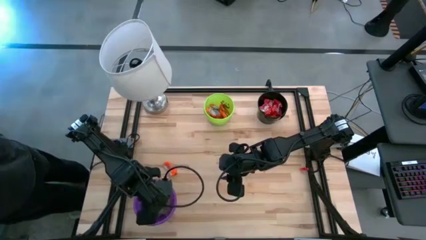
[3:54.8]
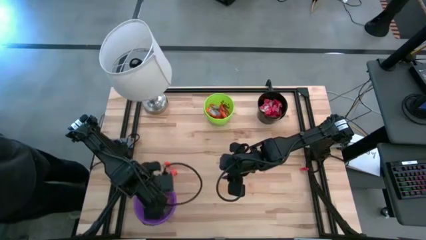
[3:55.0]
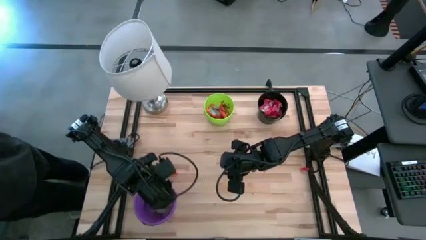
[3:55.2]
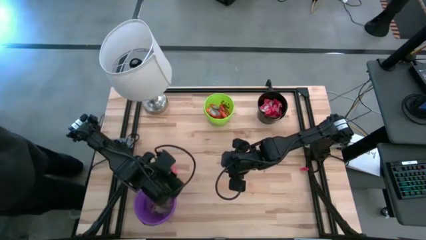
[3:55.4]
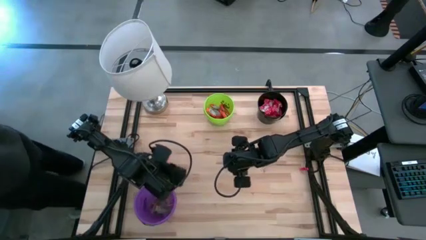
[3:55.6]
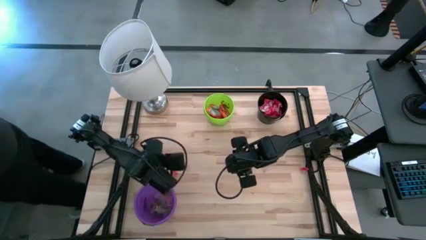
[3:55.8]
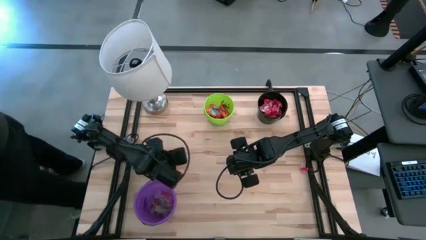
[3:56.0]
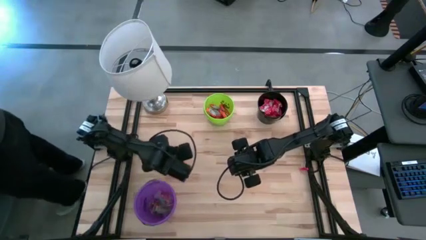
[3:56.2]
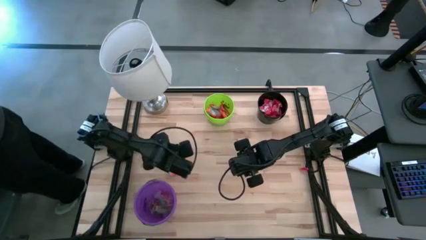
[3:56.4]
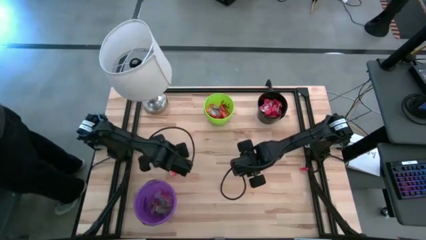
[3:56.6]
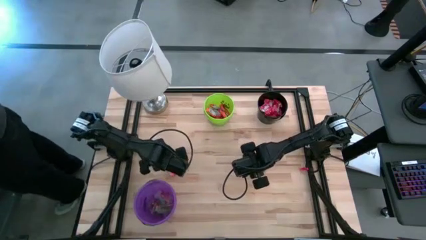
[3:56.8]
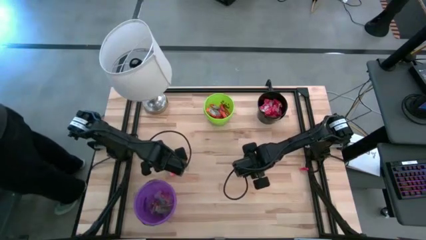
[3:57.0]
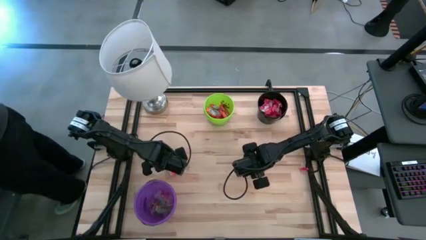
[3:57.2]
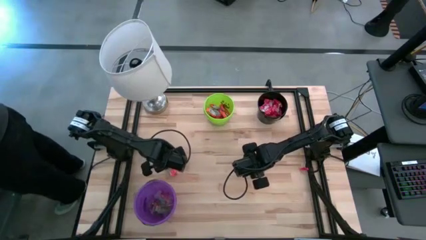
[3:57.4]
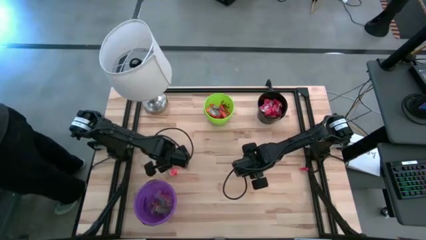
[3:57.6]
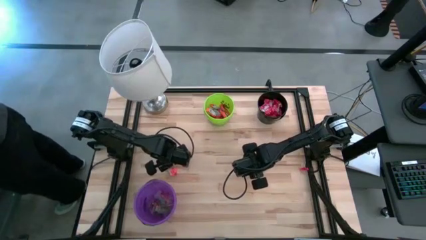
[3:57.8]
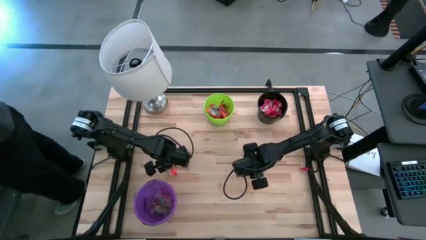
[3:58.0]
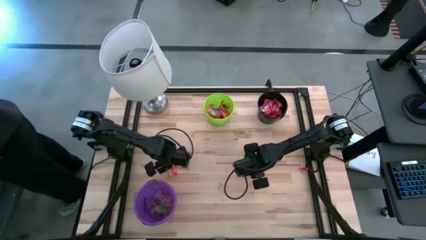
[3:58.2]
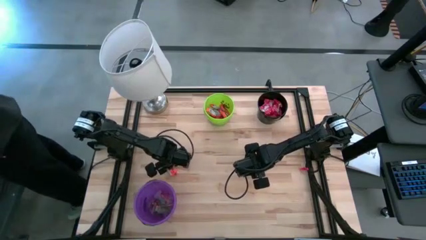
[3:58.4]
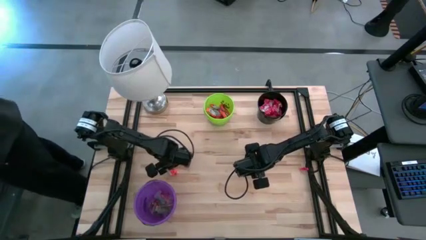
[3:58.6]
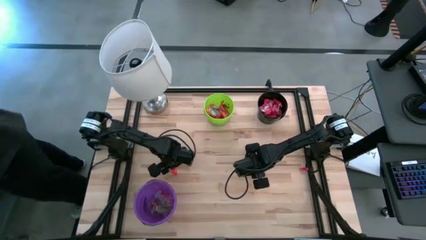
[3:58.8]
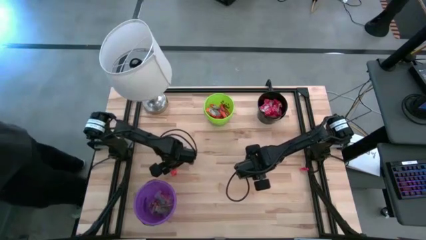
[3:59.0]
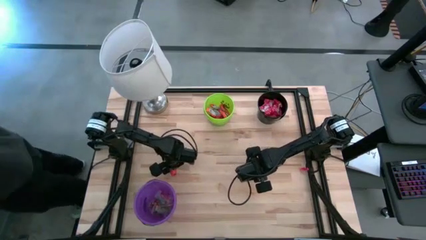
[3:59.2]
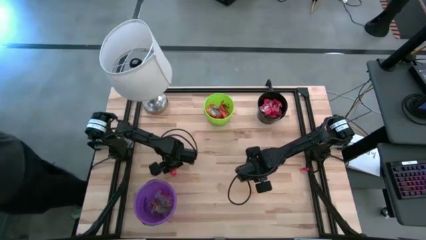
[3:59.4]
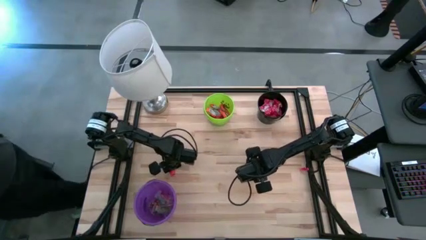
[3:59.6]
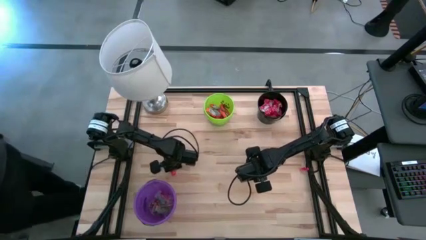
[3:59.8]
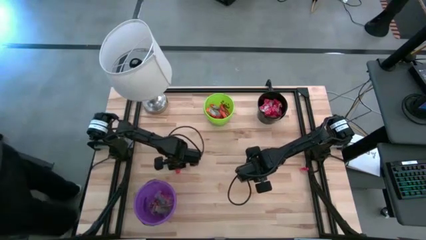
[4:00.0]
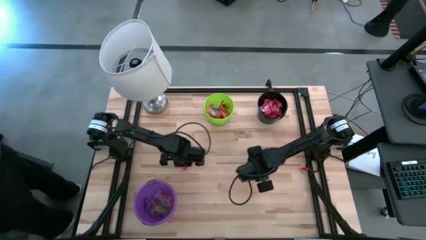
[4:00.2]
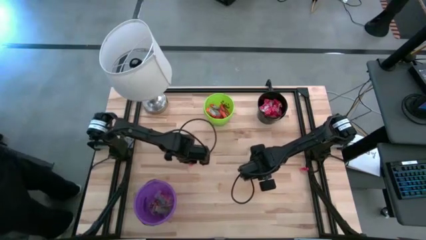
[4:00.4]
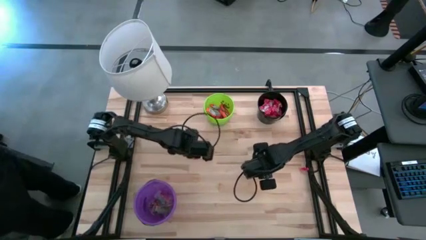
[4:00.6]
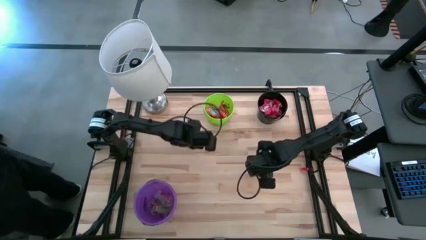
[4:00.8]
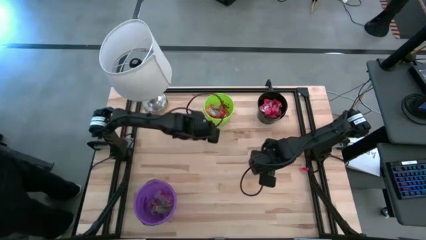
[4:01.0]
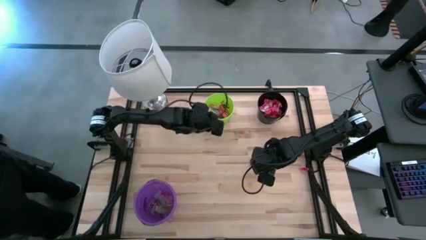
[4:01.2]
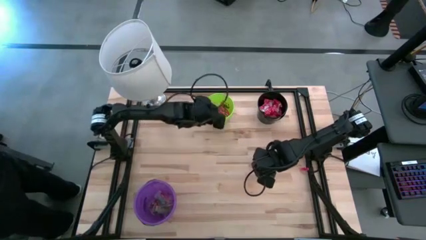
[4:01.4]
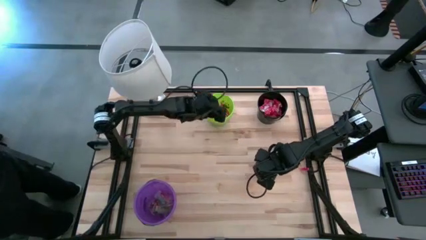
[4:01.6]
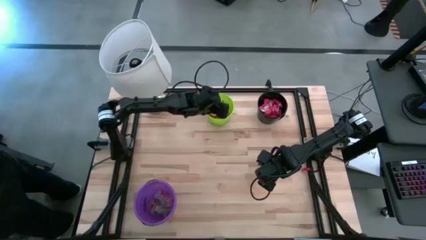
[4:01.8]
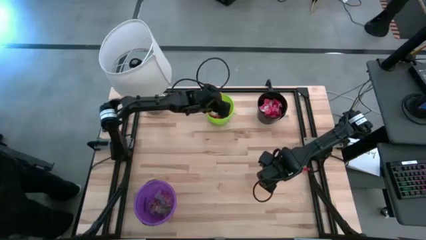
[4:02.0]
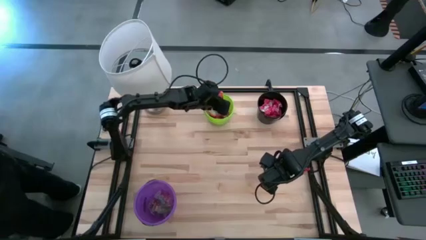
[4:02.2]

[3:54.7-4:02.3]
Task: Sort candy
Put the orange chocolate into the green bucket

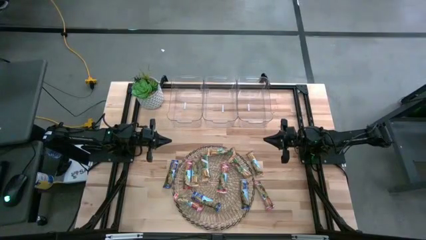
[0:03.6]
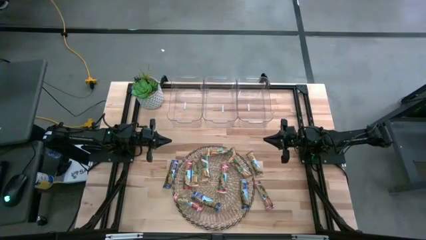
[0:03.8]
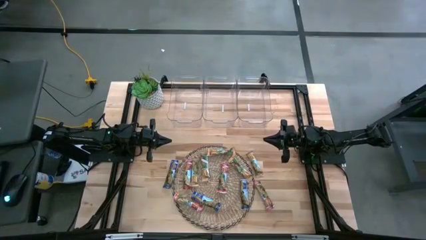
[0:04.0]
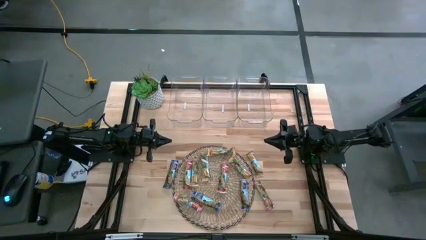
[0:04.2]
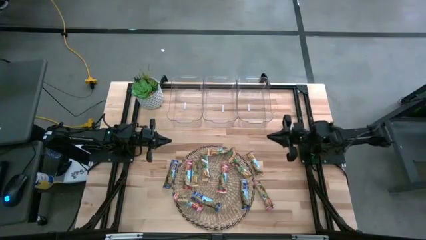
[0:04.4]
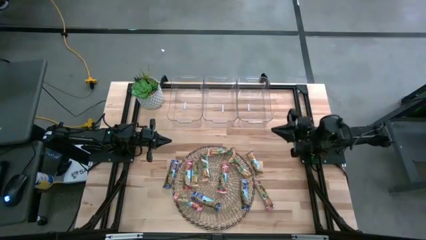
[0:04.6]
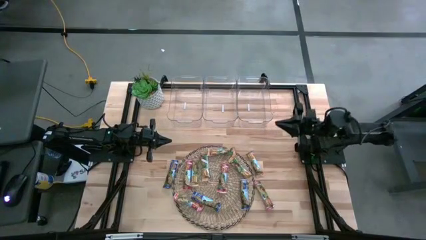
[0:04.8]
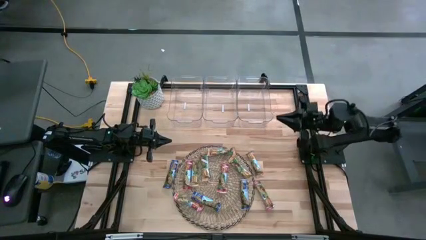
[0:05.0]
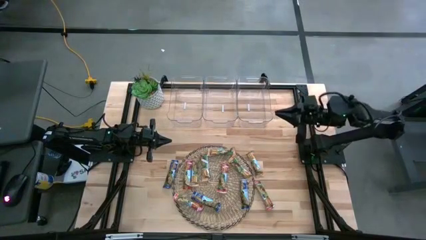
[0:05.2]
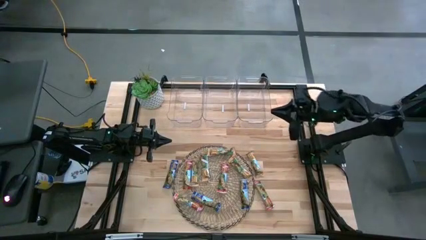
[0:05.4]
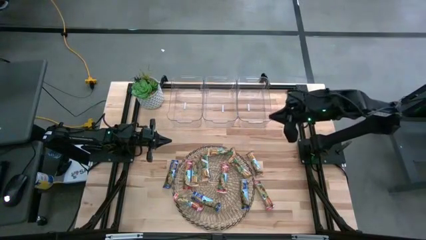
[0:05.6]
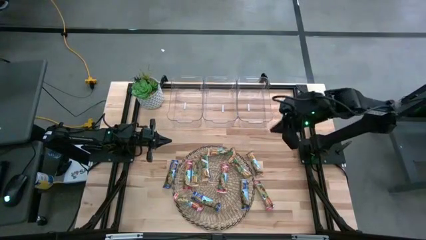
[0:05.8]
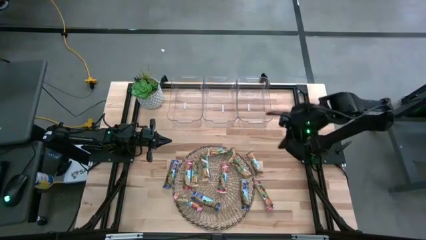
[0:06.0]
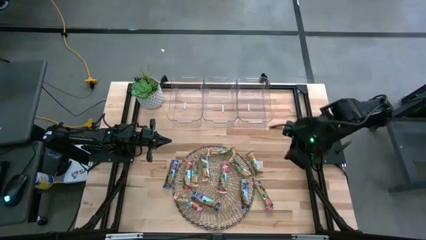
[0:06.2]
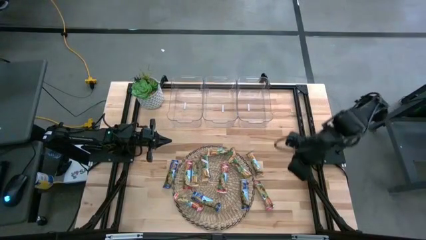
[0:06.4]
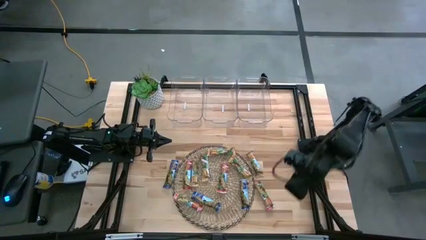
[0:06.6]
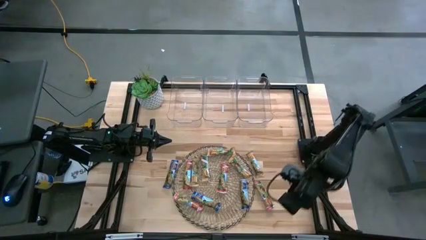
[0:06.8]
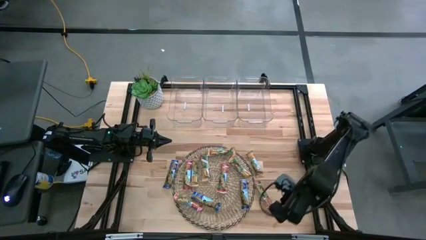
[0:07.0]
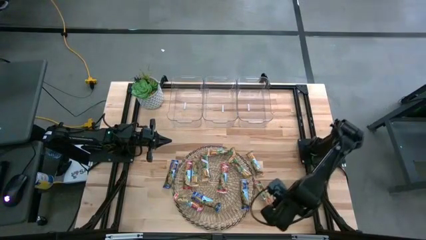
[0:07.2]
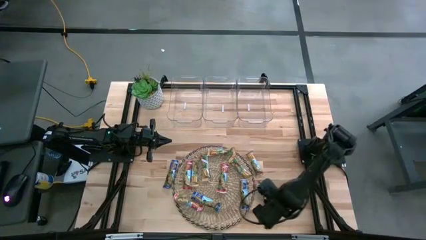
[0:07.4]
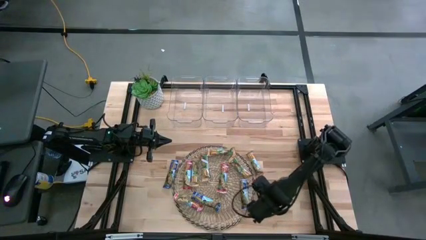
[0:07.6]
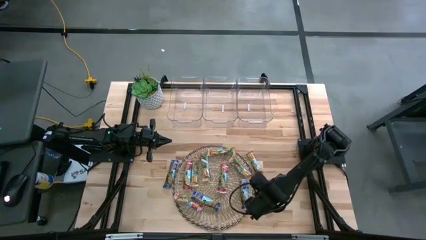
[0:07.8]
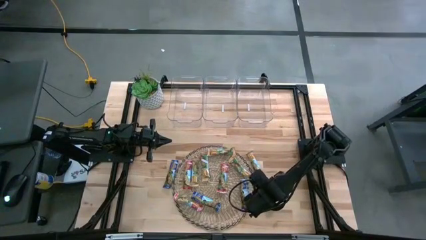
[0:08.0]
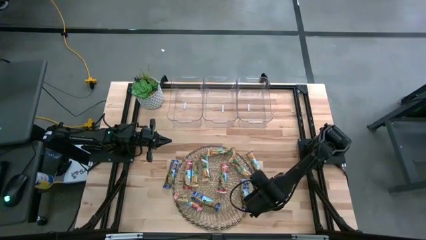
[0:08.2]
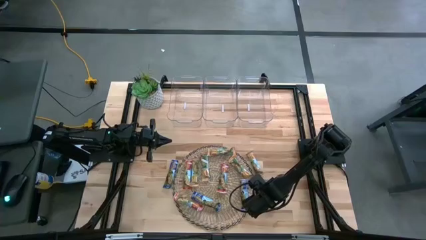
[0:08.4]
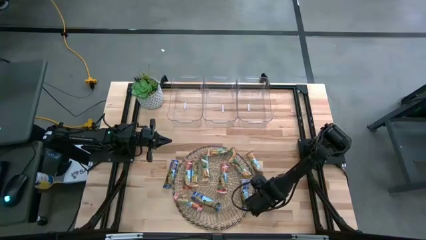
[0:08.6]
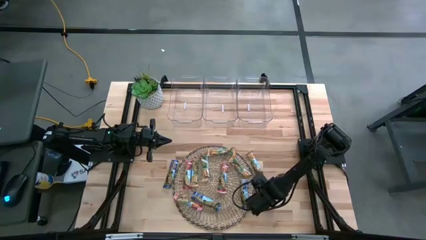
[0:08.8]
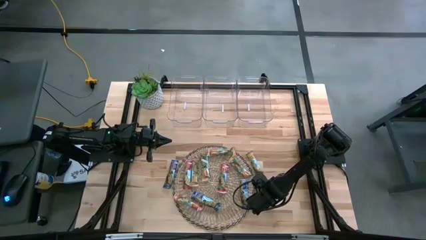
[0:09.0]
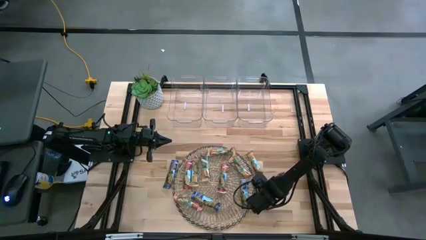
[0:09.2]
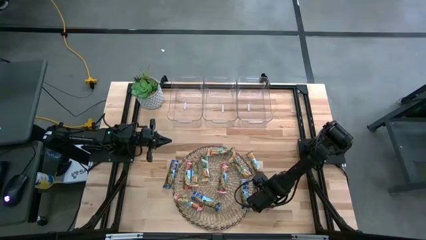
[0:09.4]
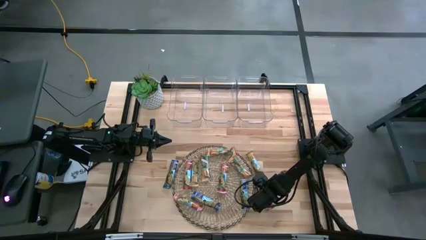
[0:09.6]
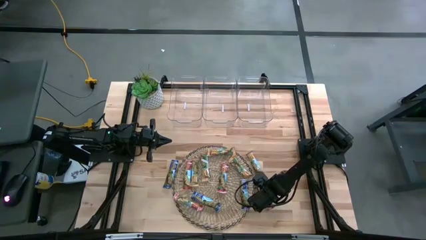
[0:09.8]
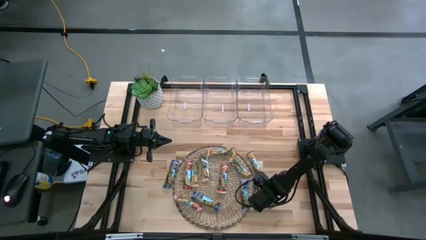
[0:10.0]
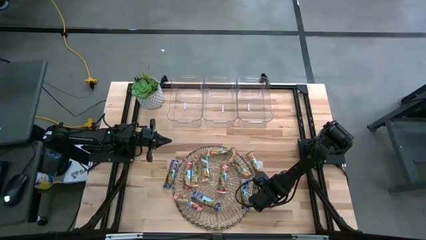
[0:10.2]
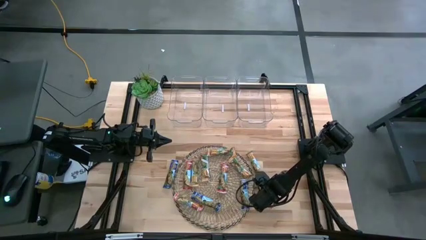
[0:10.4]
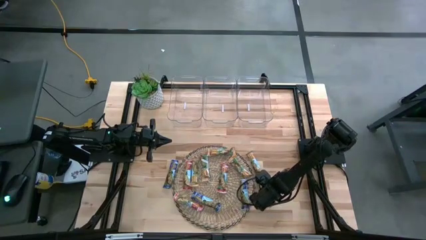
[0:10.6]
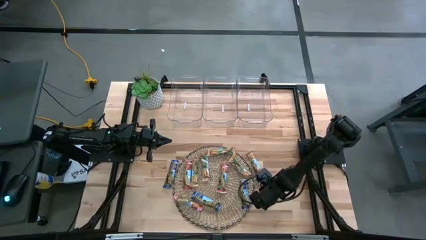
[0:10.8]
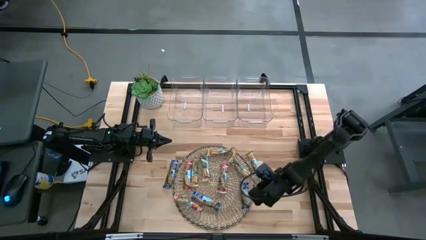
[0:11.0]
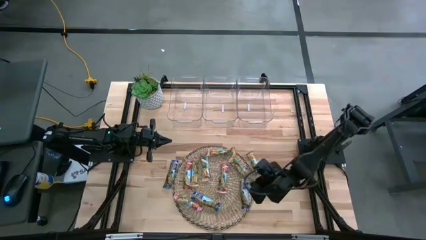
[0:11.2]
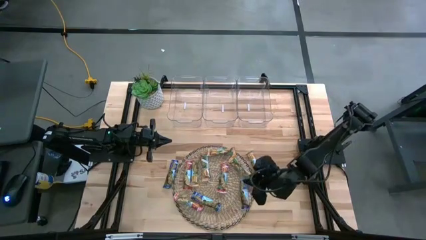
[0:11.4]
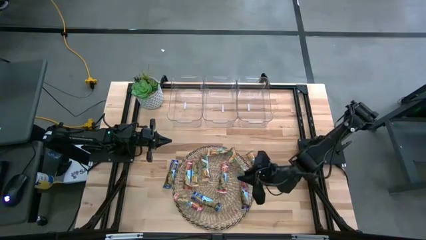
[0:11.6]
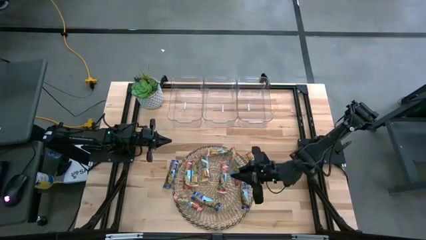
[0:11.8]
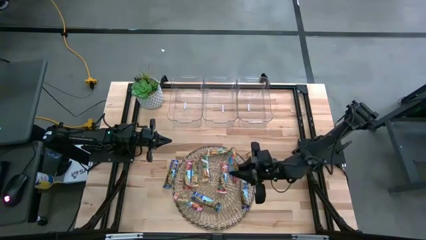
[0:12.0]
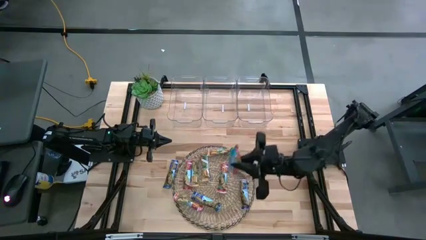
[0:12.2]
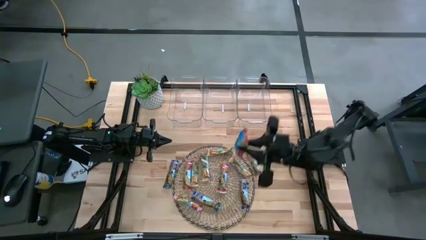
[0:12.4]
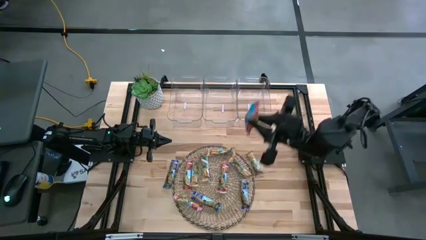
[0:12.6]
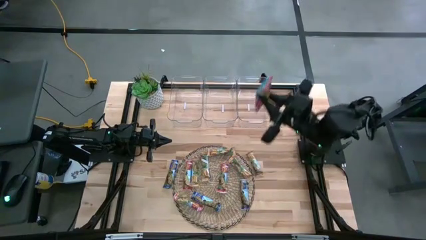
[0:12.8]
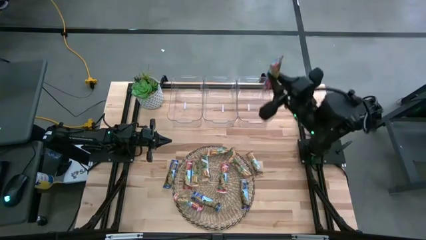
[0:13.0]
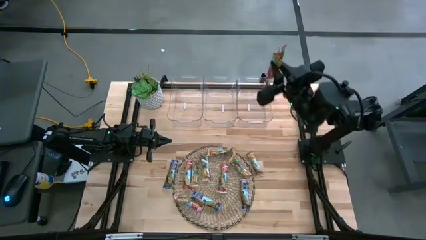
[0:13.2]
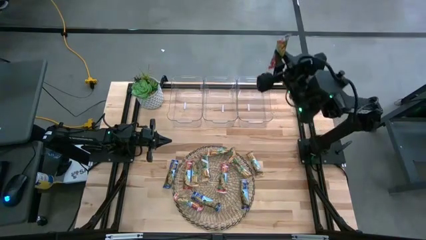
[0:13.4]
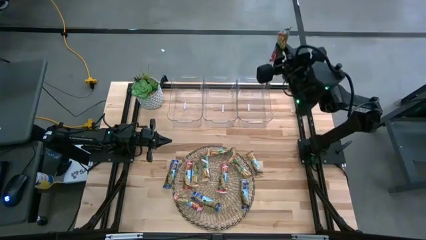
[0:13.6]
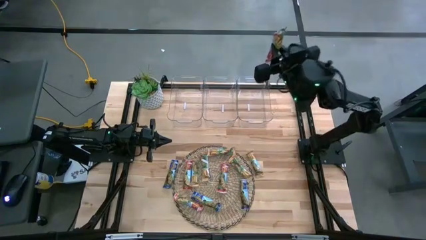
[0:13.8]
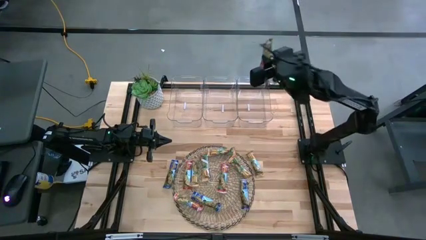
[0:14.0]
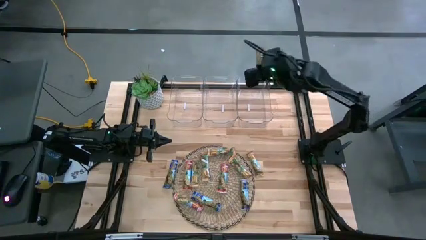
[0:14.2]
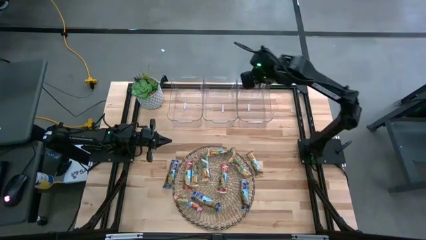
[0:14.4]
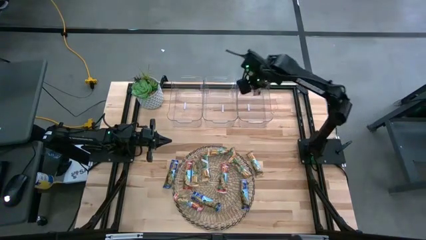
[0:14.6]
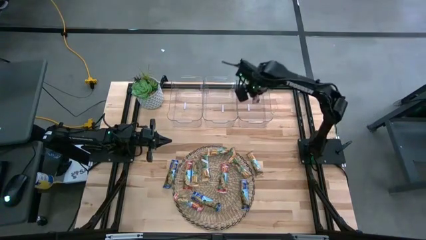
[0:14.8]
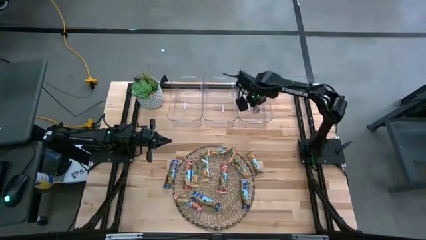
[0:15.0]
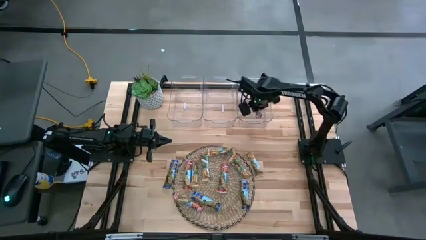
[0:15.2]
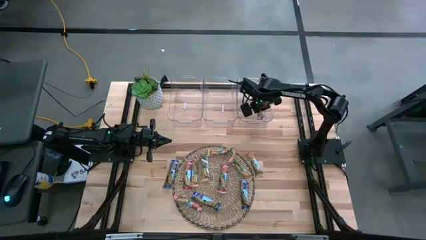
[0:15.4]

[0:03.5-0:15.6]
Task: Pick and place Granola Bars by type
Put the red granola bar into the right transparent bin
